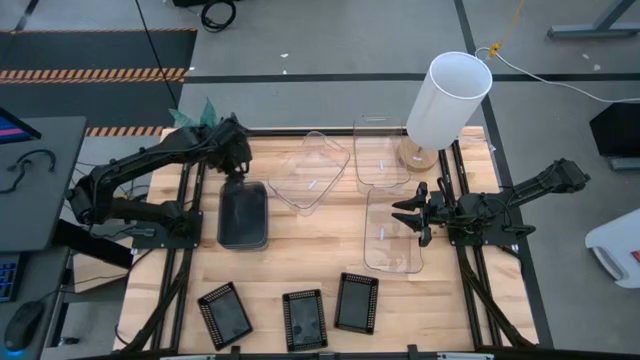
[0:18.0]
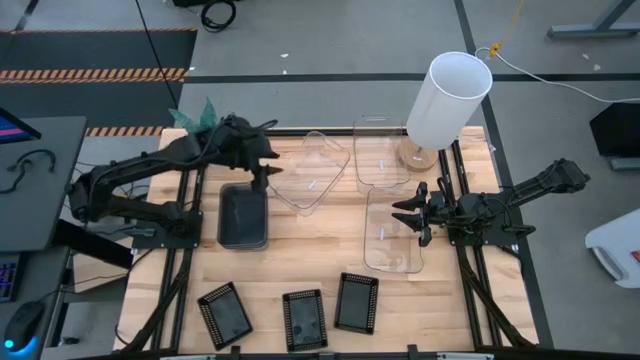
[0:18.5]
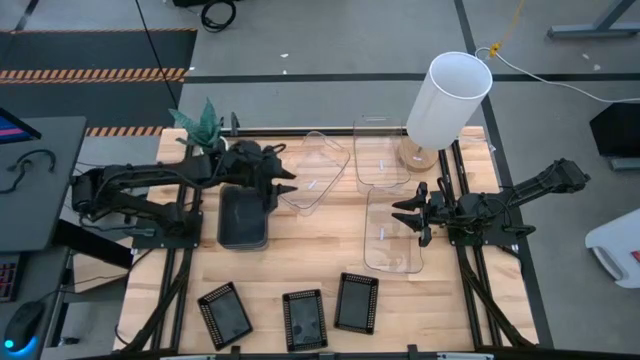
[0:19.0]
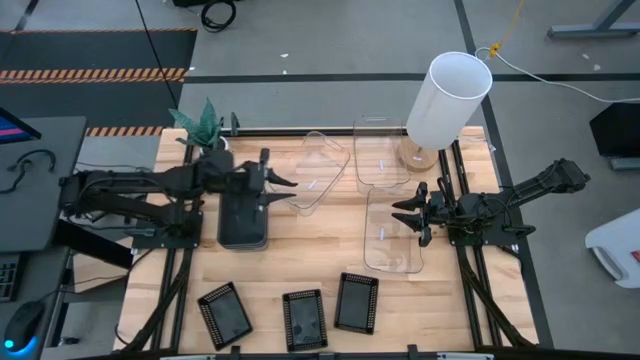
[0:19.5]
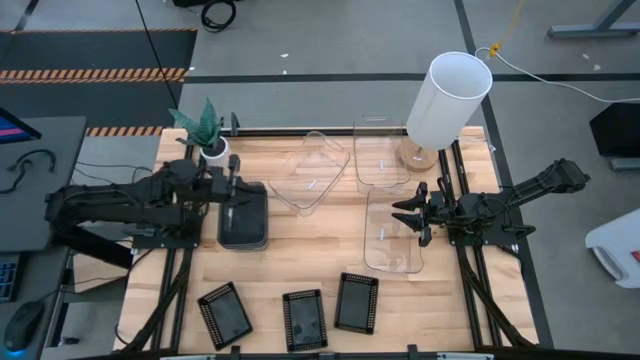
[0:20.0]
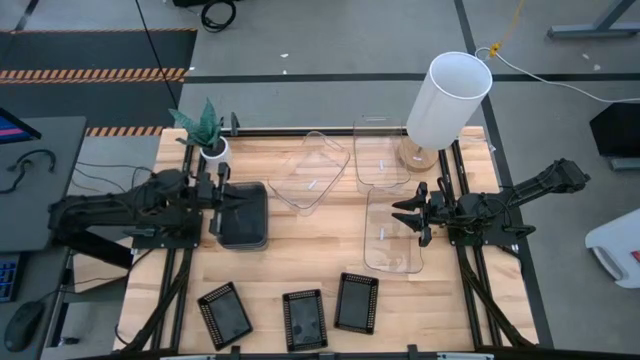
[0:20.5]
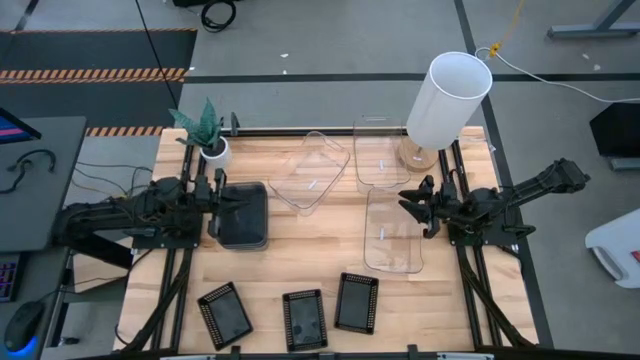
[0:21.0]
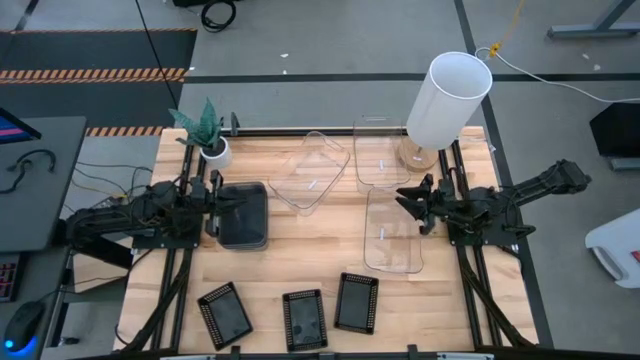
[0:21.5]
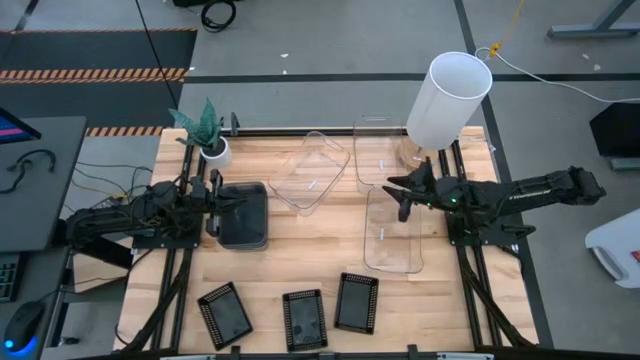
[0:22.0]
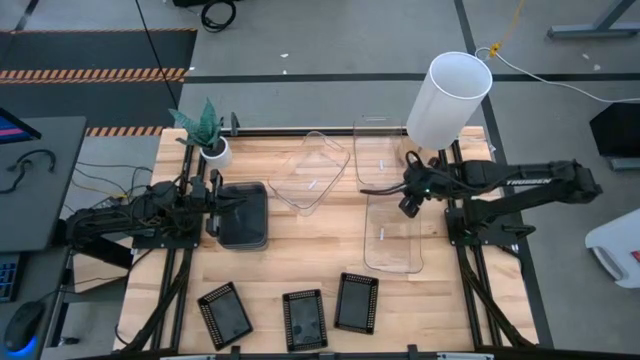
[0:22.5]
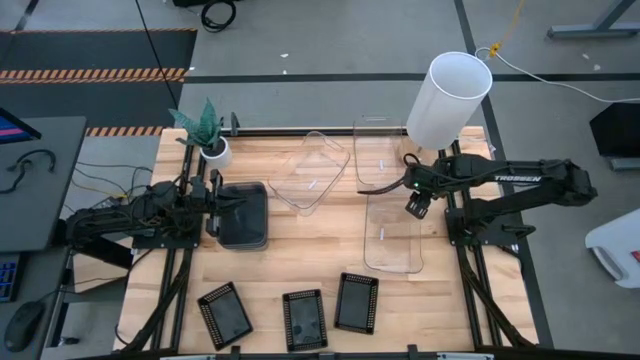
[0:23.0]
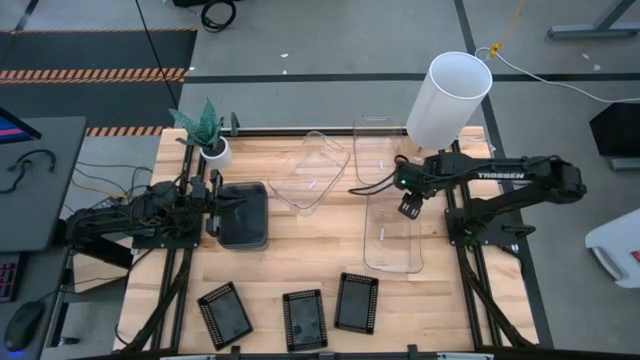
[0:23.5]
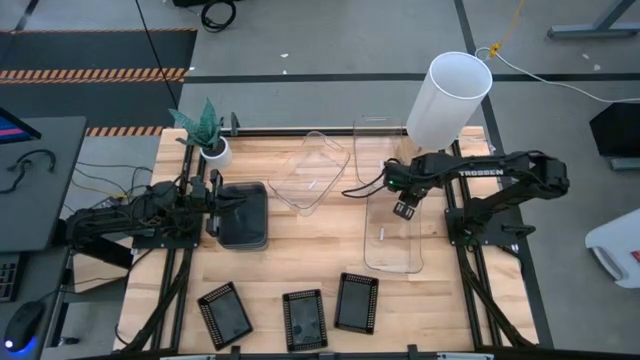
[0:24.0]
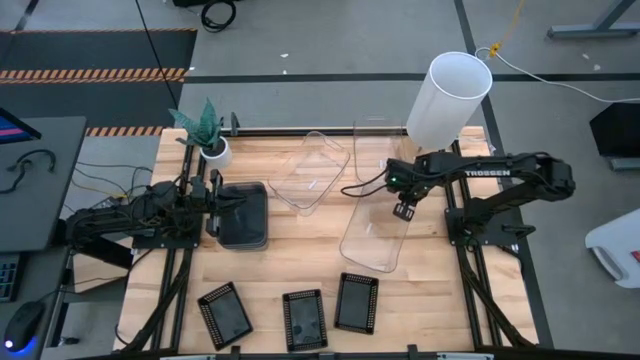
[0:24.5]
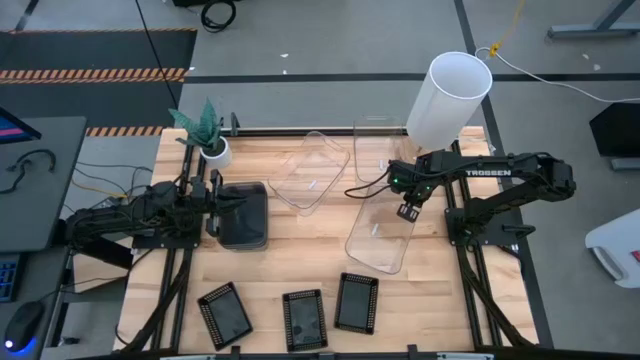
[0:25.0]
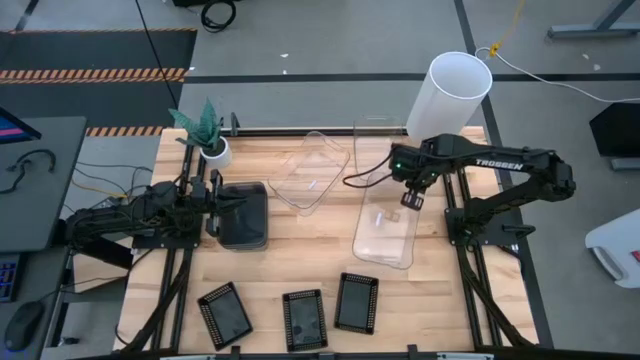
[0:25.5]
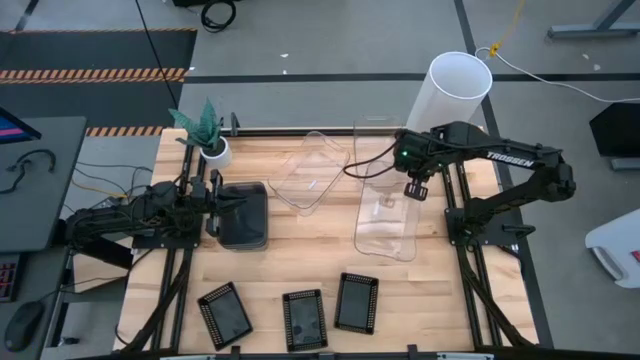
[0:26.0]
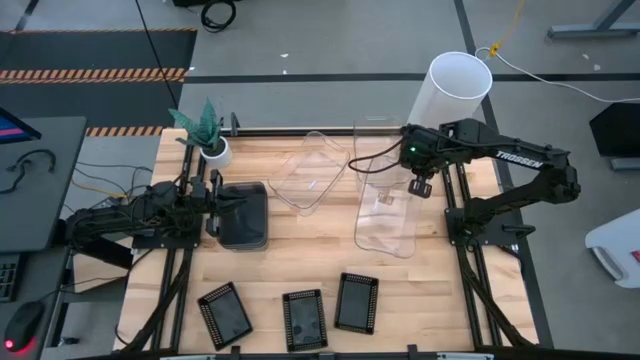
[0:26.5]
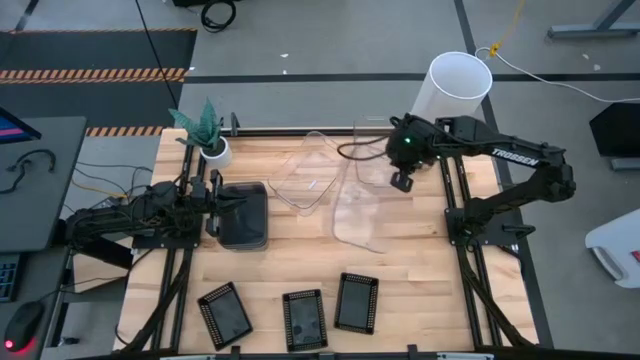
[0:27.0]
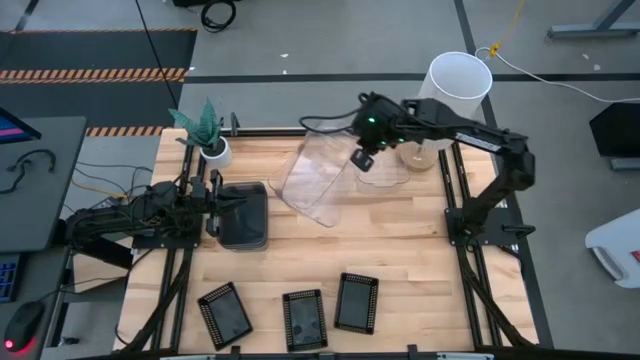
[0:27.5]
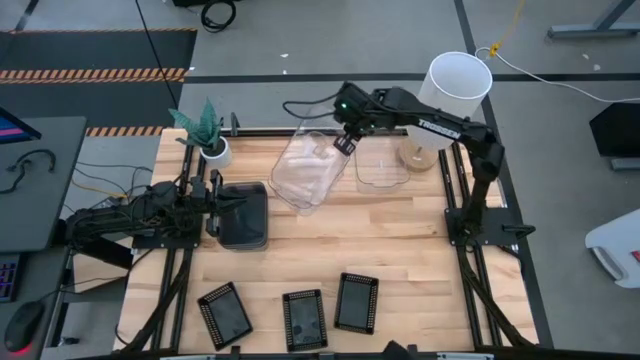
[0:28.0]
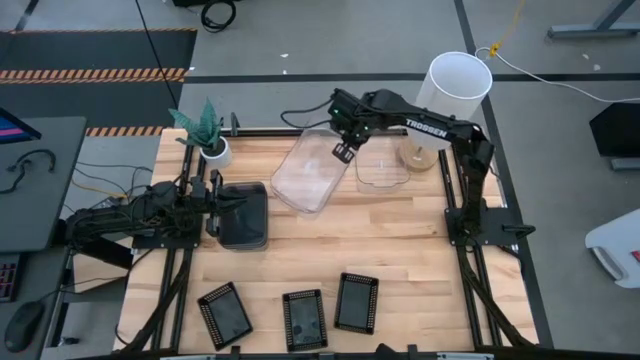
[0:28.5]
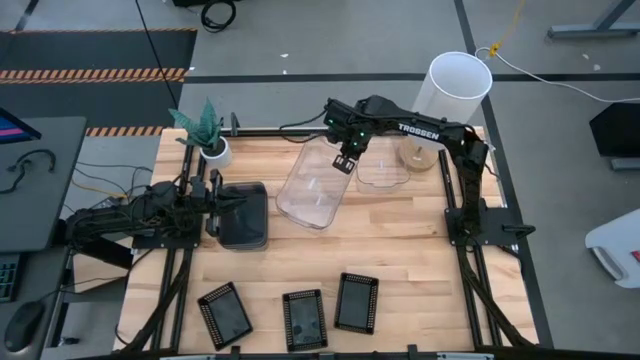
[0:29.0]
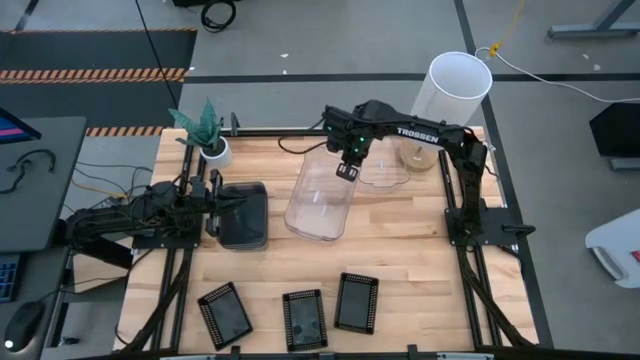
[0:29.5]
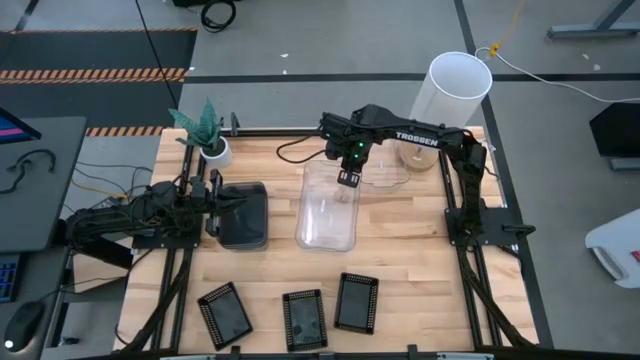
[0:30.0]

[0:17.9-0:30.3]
Stack the bottom transparent bin on top of the top left transparent bin

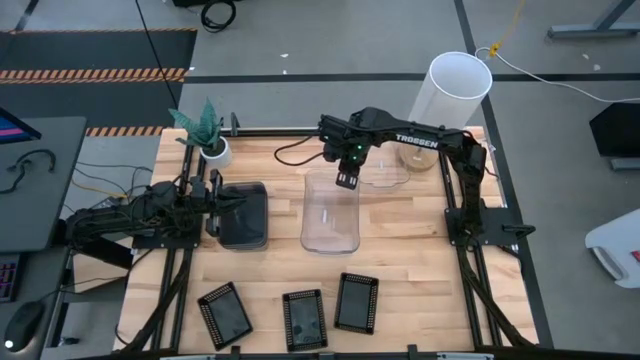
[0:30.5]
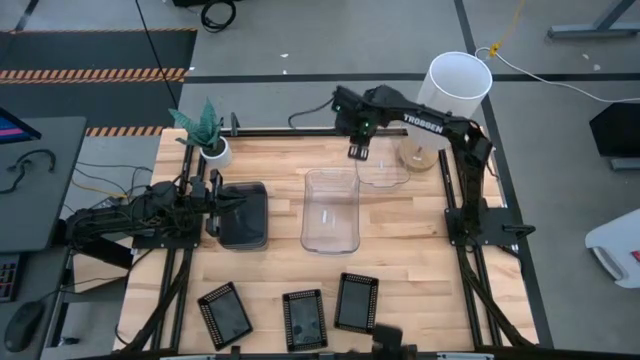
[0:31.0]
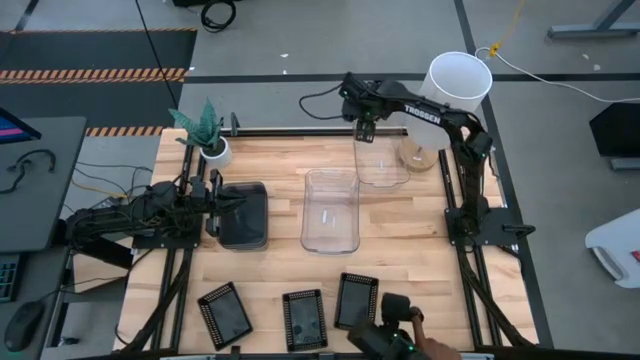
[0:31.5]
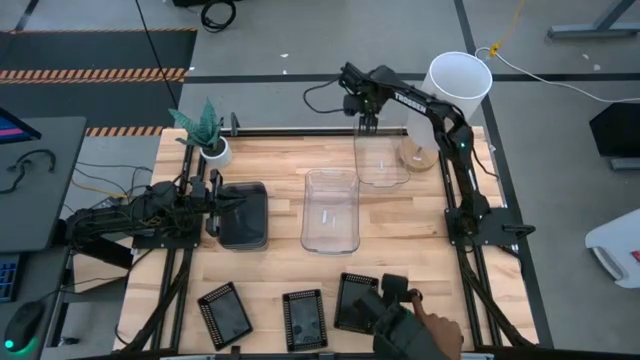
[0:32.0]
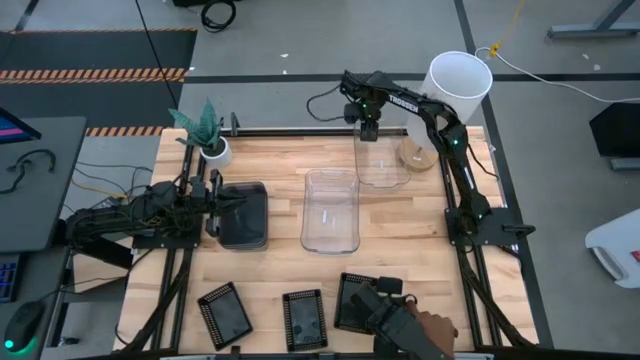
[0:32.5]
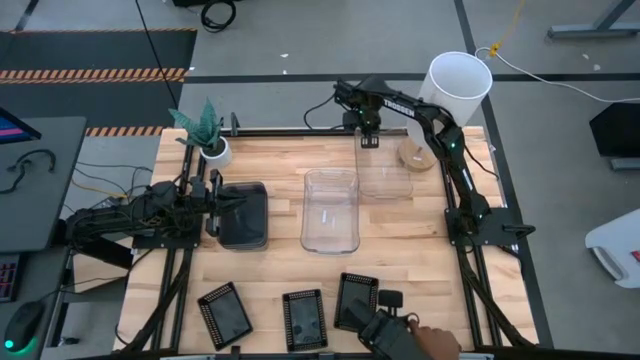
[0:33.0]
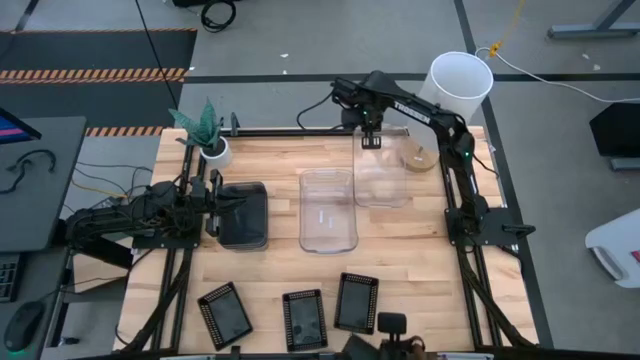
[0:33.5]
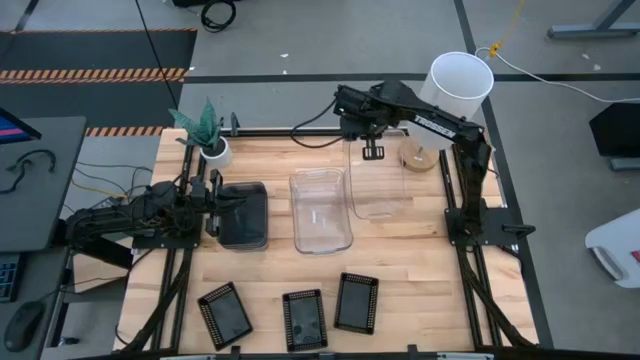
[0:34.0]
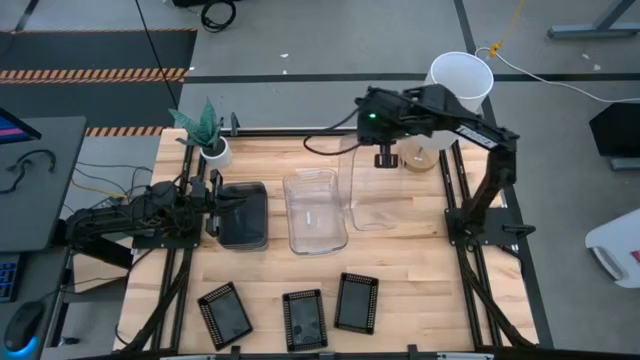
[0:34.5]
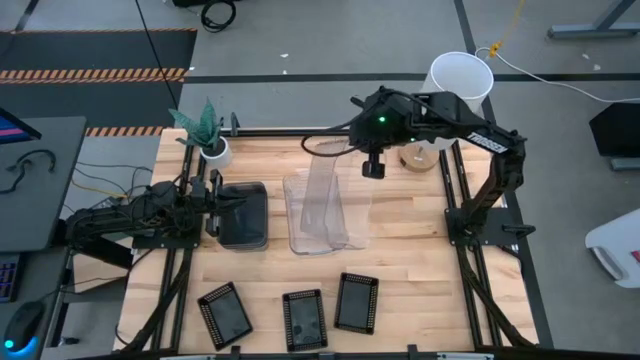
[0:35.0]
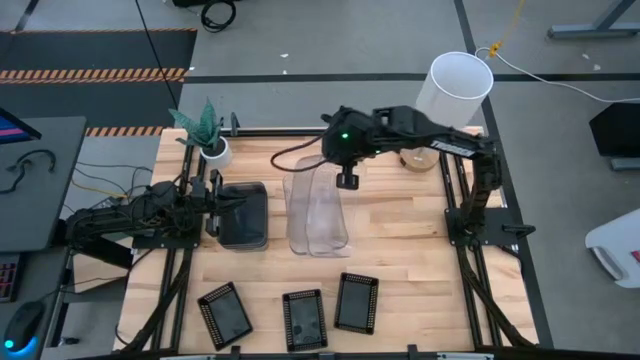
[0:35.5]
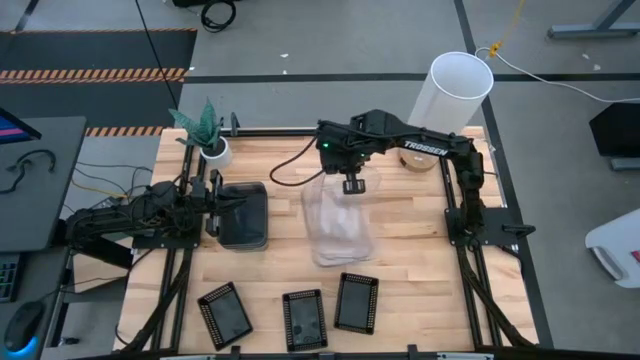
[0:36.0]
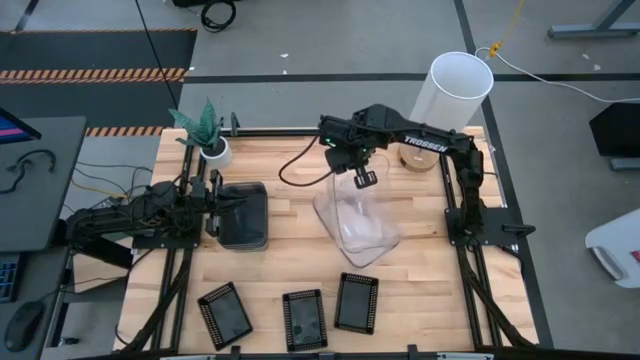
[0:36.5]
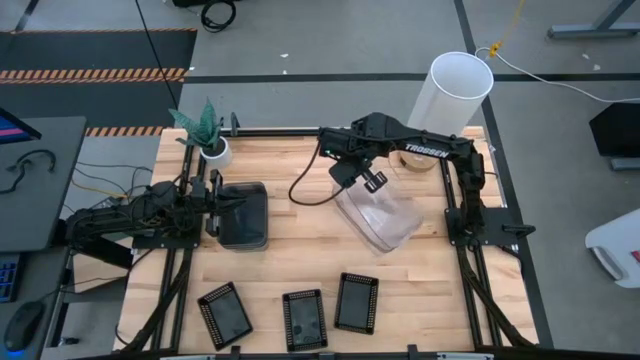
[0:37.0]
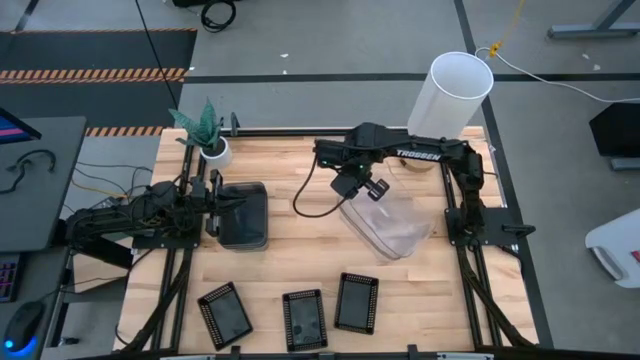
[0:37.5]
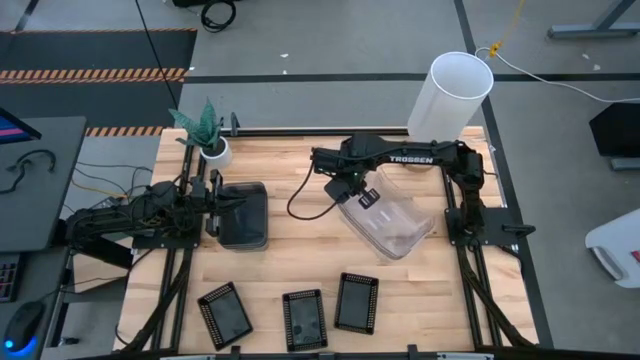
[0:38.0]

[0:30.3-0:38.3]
Stack the right transparent bin on top of the left transparent bin
